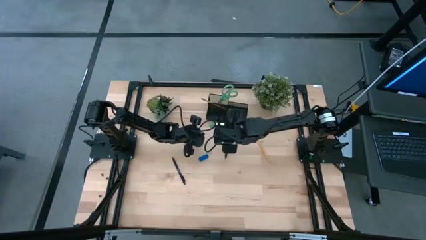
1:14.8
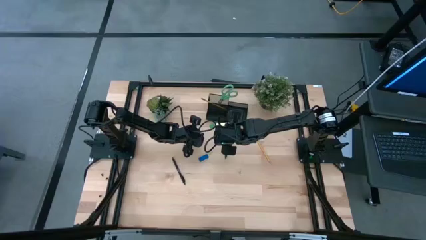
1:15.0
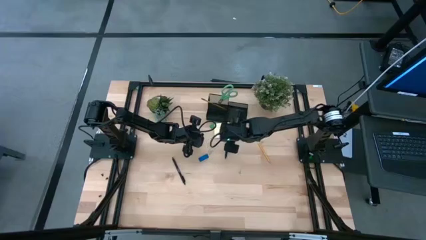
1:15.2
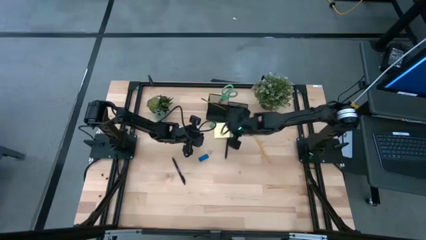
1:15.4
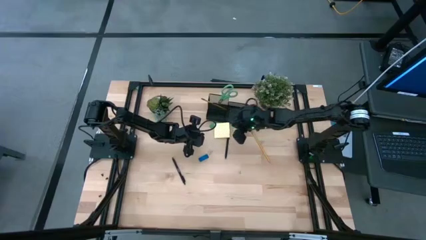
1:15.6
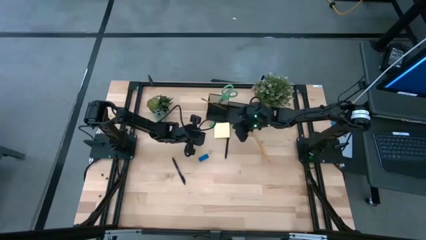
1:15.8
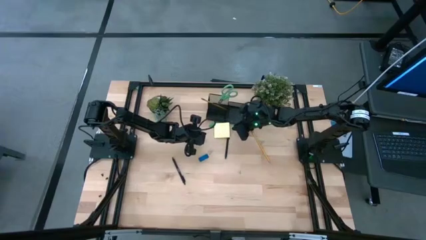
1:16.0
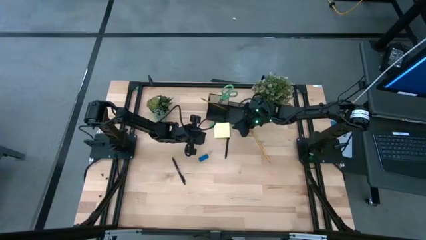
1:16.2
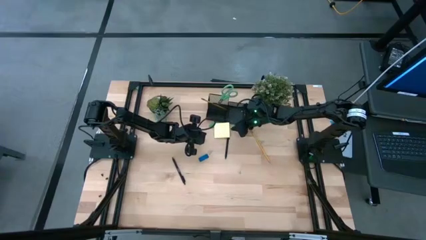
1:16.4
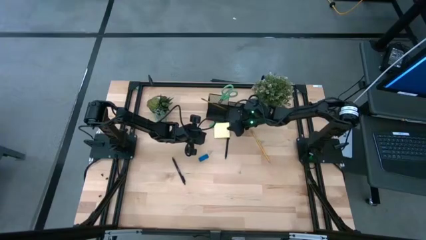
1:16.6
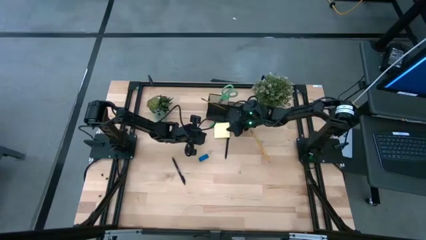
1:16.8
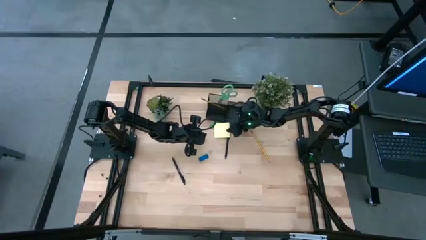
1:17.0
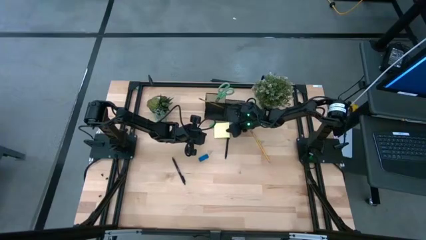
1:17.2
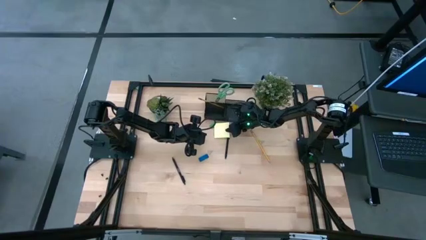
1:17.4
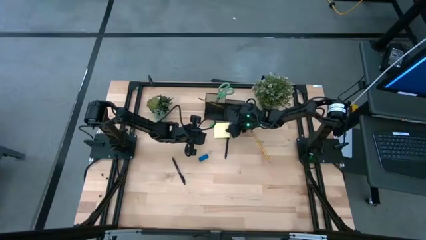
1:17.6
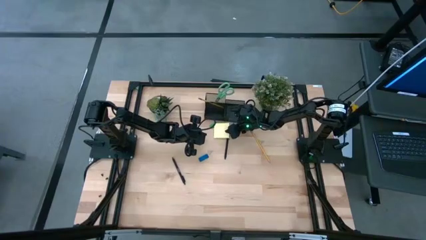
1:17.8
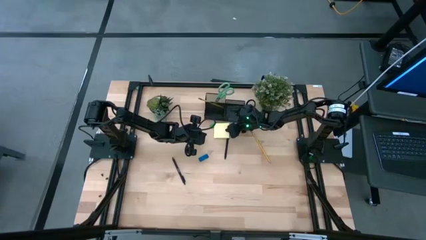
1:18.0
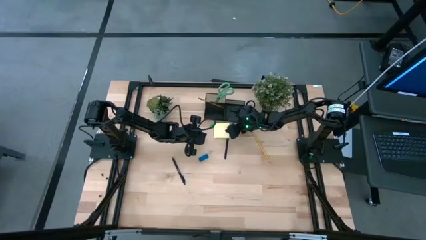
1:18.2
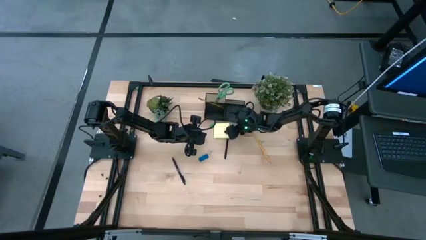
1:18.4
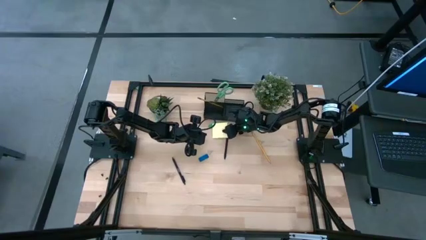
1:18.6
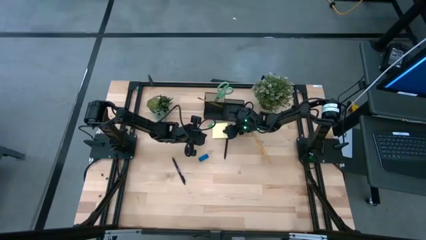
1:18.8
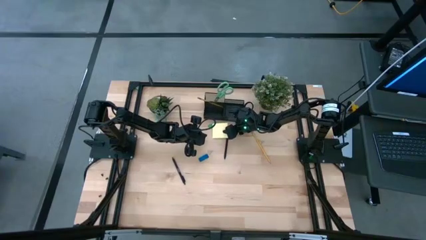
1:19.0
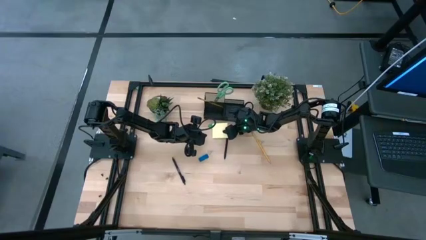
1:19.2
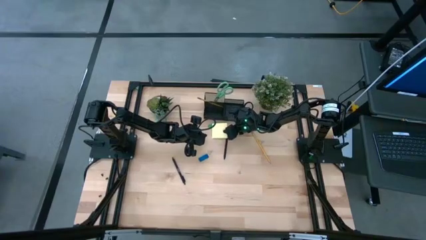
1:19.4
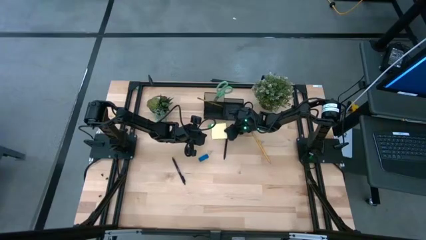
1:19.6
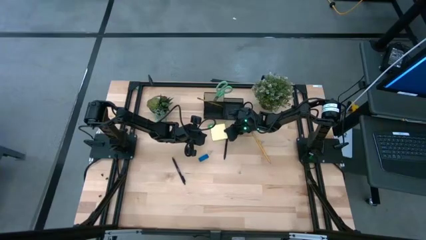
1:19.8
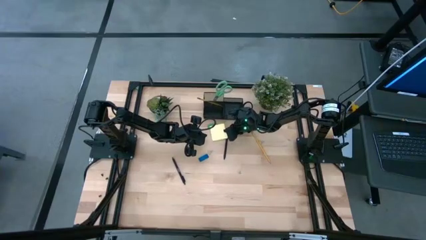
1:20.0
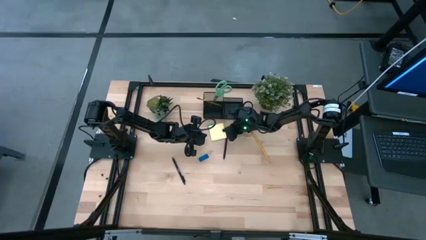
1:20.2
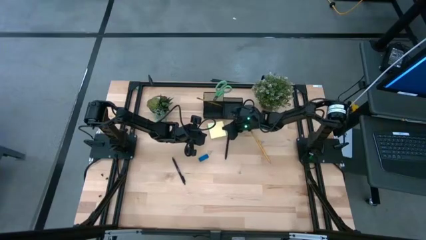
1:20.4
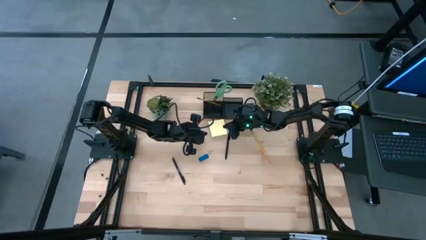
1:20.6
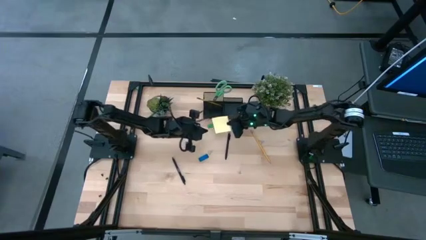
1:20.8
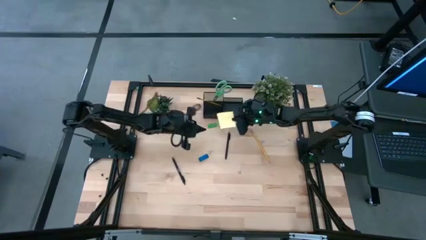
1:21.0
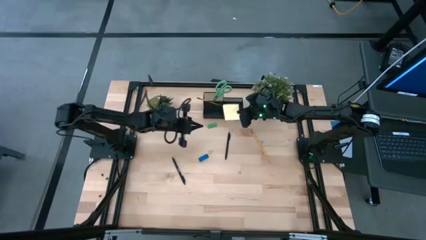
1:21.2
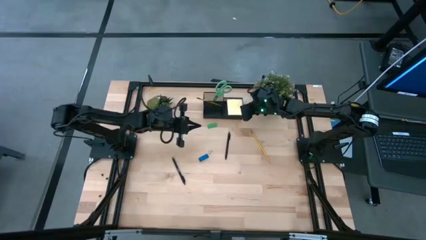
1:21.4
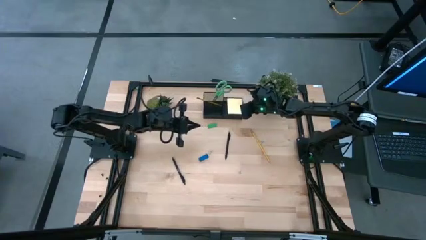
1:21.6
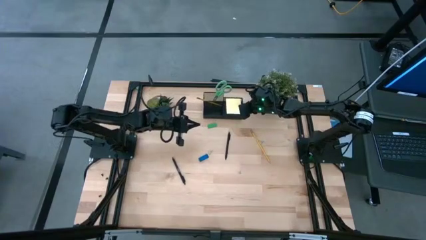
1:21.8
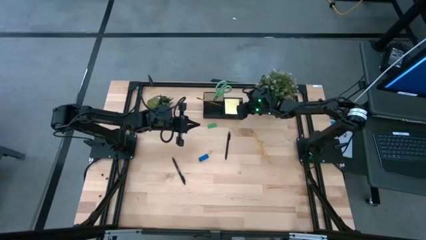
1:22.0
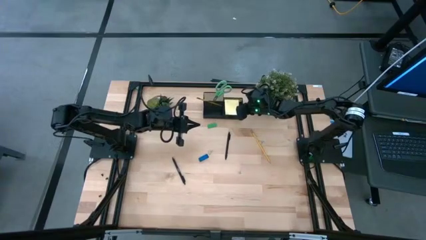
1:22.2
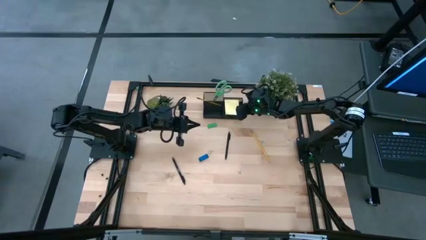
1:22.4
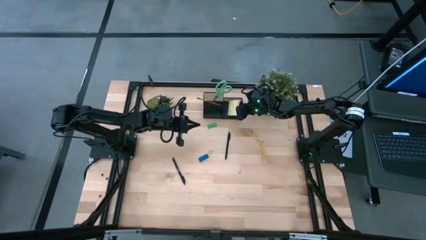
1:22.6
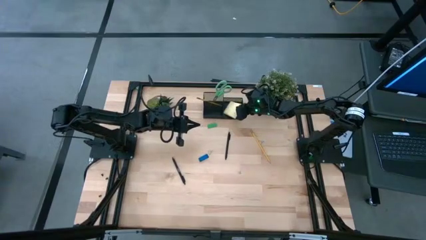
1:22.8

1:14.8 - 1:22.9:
Task: Pick and place office supplies into organizer
Put the yellow sticky notes into the black desk organizer
